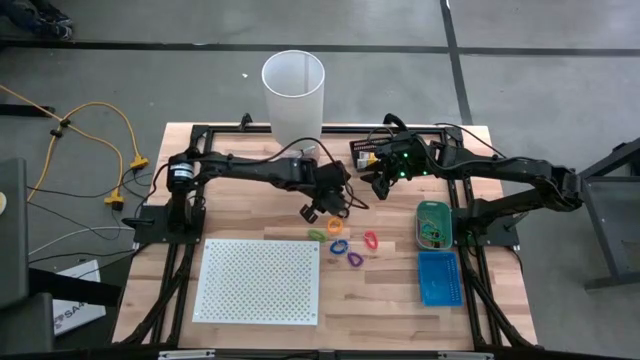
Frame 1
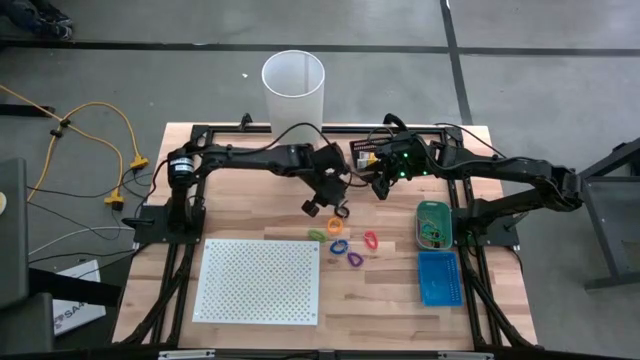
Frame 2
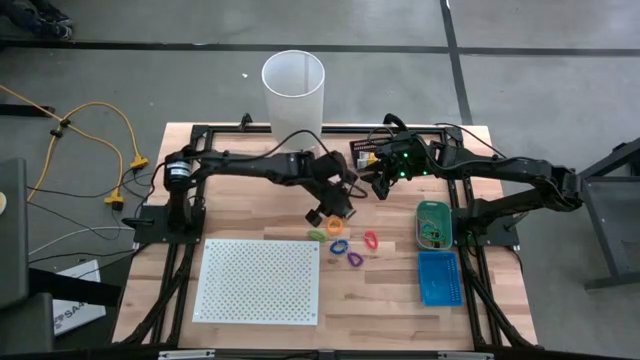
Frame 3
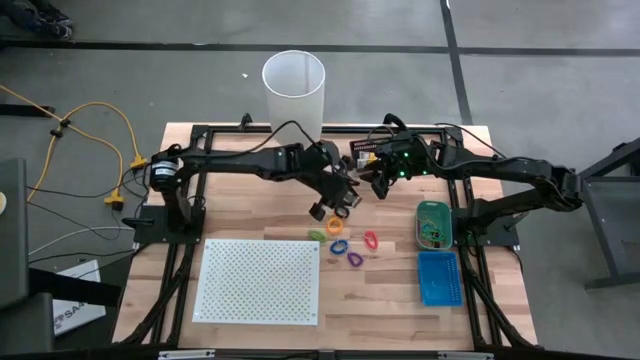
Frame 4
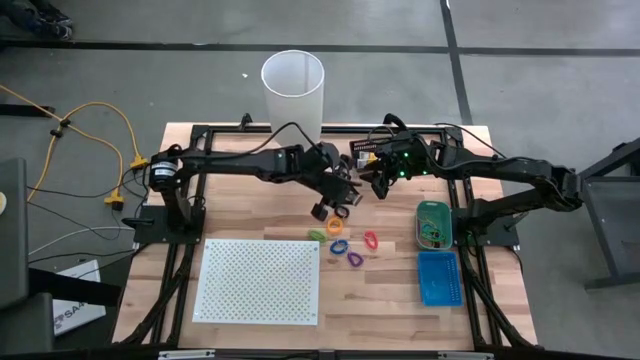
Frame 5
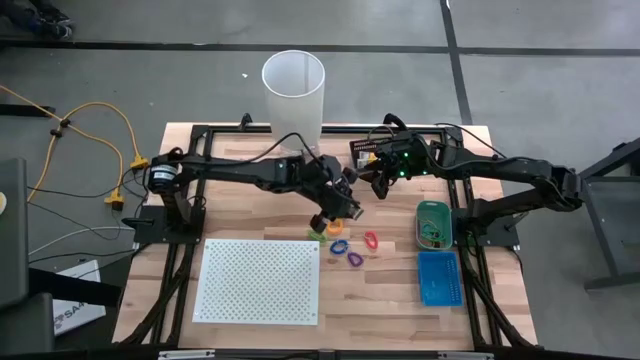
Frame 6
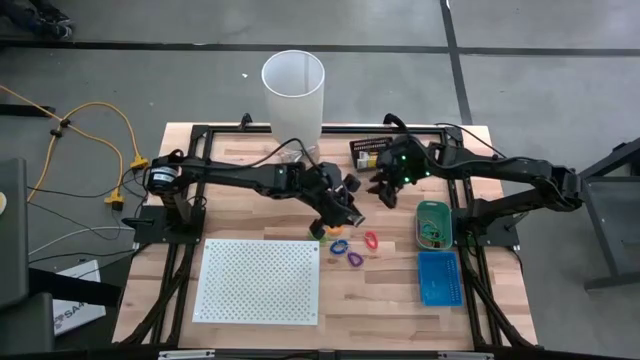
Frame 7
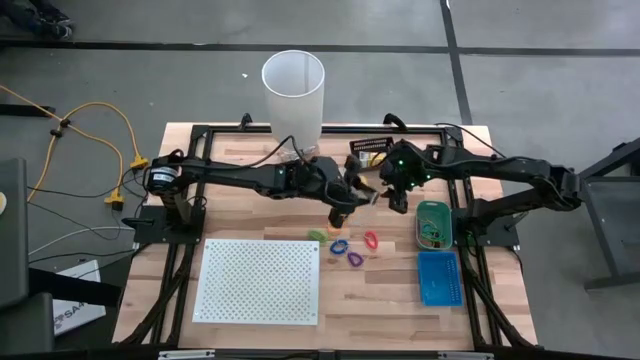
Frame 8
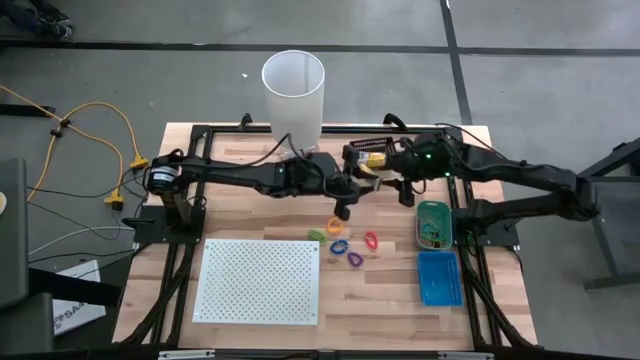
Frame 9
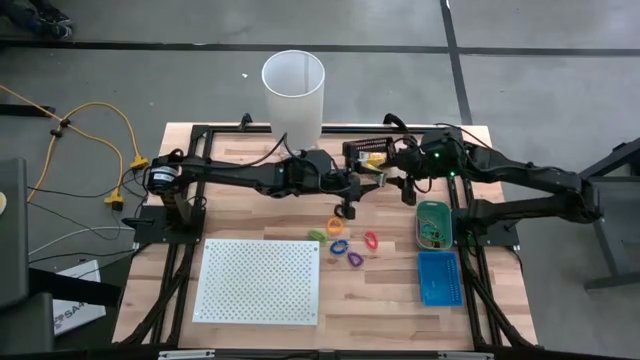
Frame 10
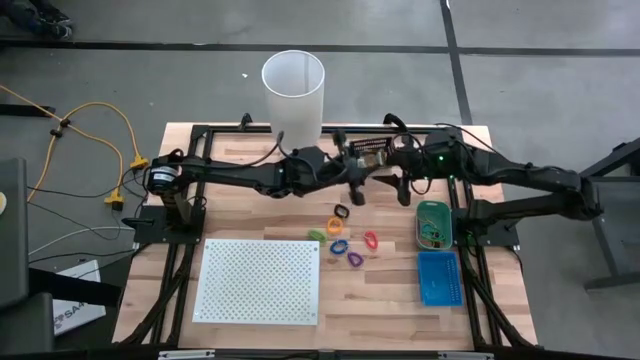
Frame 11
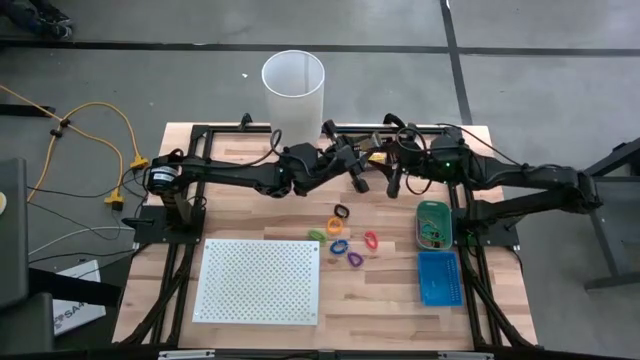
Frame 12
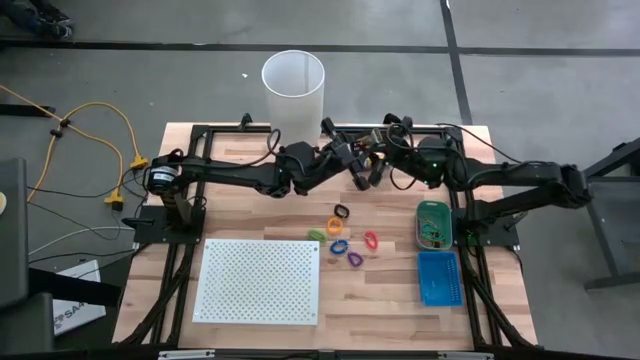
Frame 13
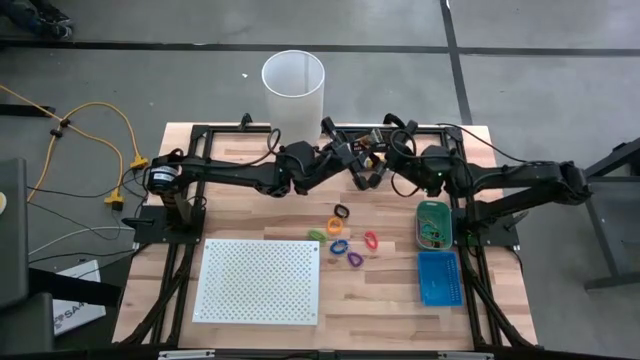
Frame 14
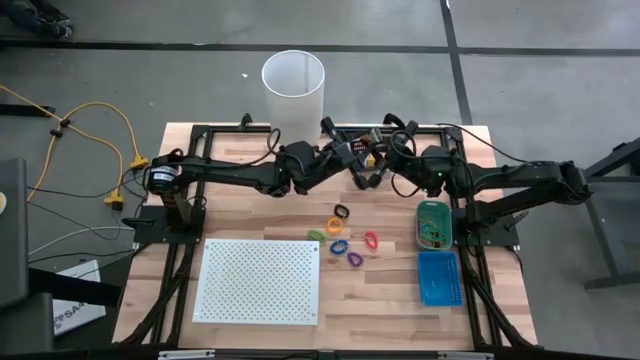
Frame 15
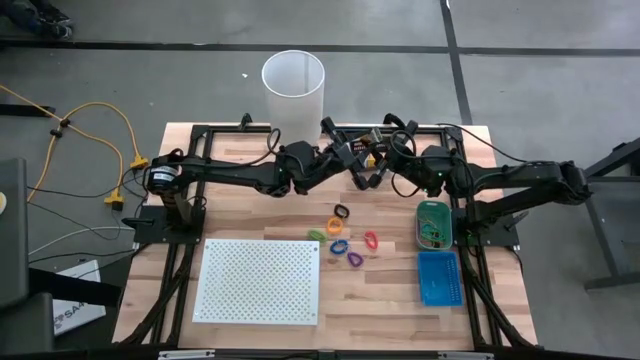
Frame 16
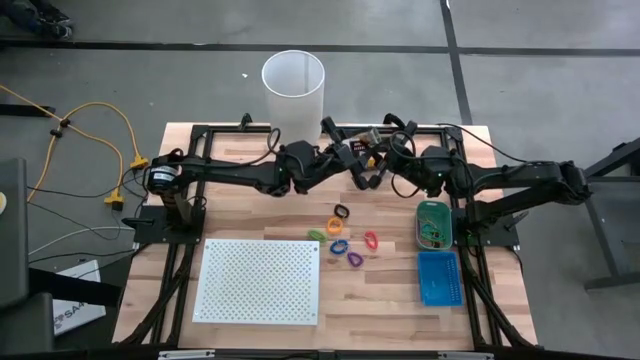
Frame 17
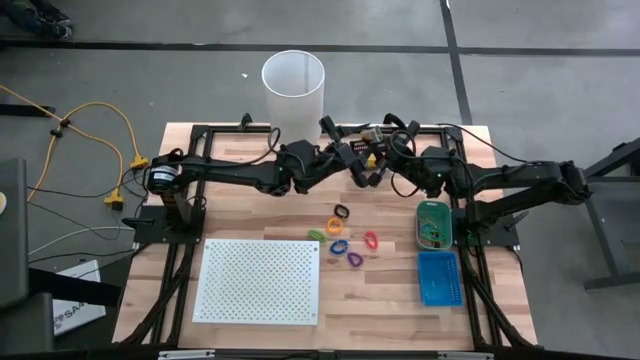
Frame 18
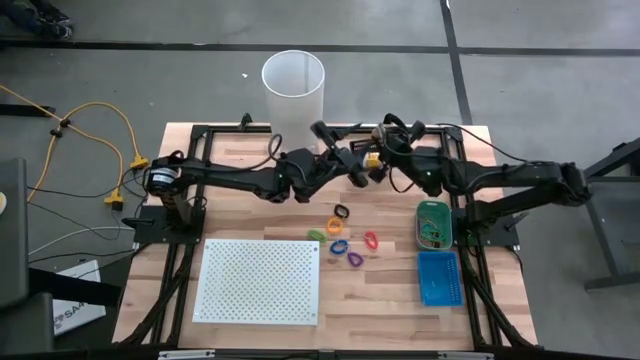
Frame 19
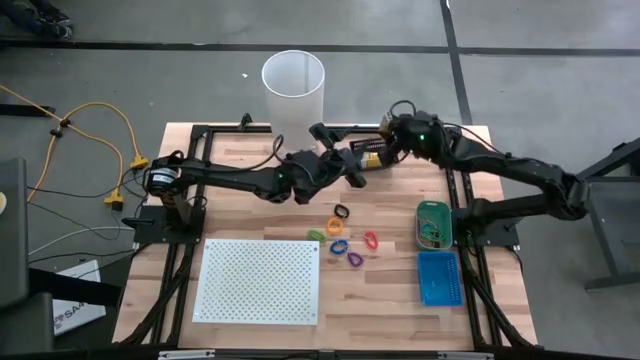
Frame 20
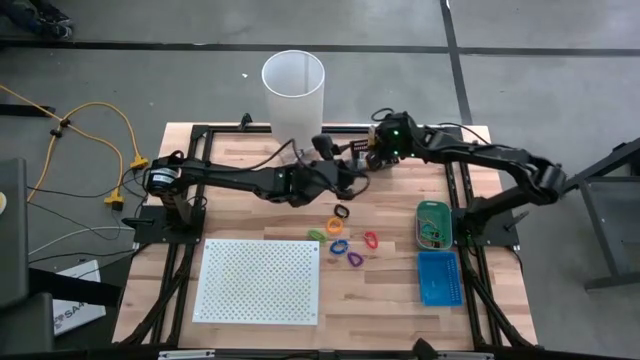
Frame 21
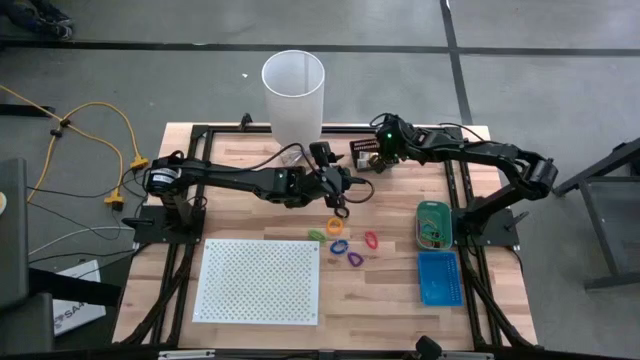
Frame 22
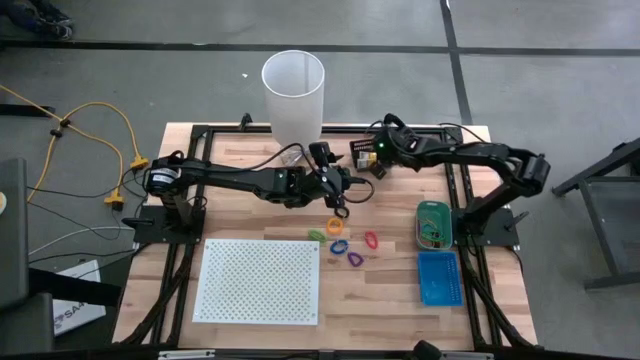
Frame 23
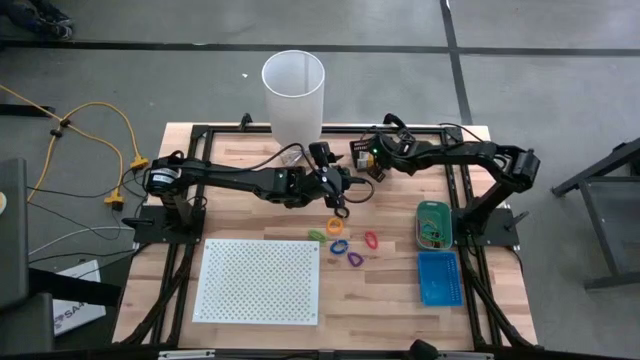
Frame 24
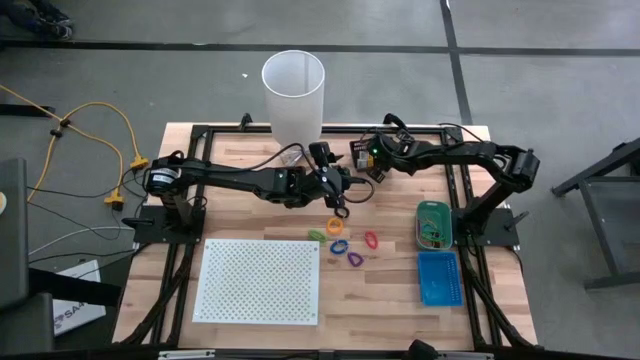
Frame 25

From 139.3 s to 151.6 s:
Task: Pick & Place Office Desk Supplies
Put the yellow crayon box into the black bin

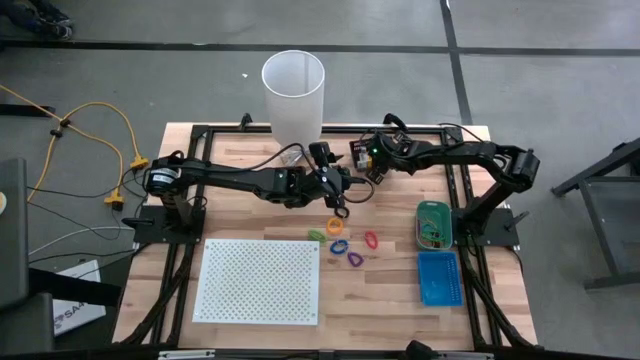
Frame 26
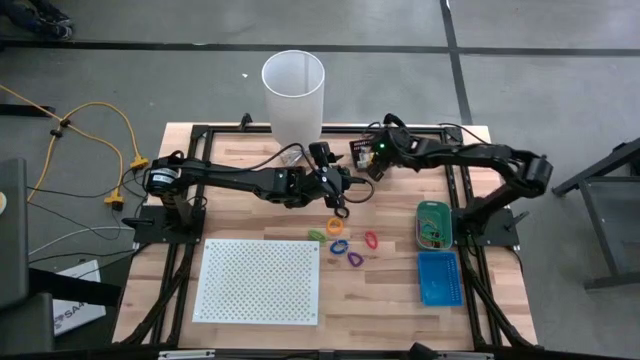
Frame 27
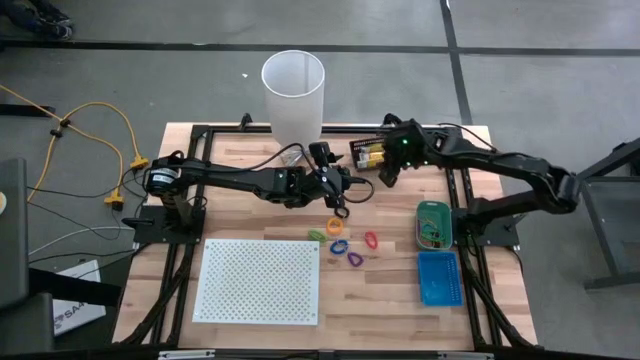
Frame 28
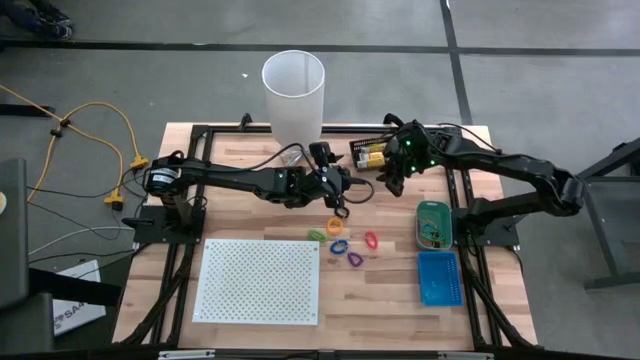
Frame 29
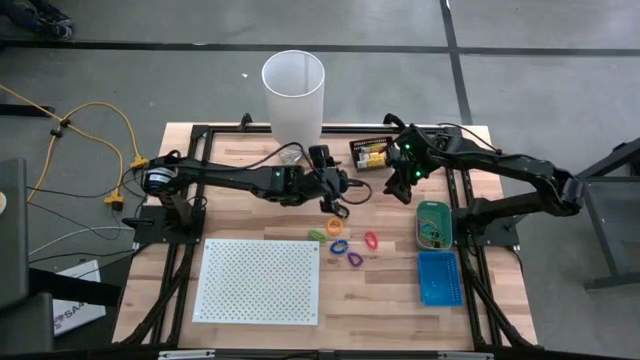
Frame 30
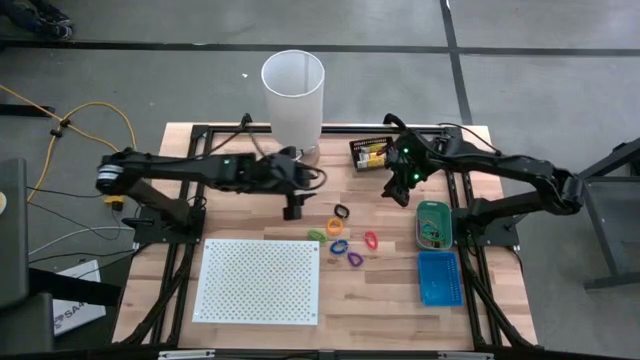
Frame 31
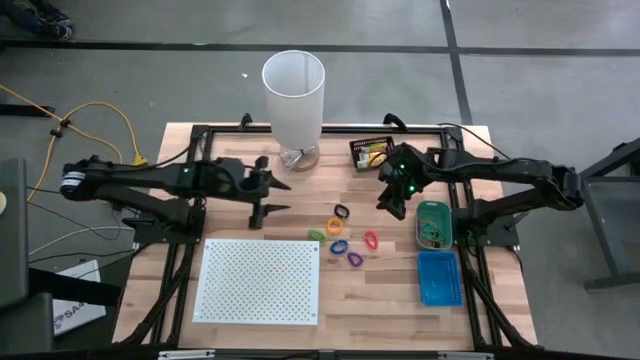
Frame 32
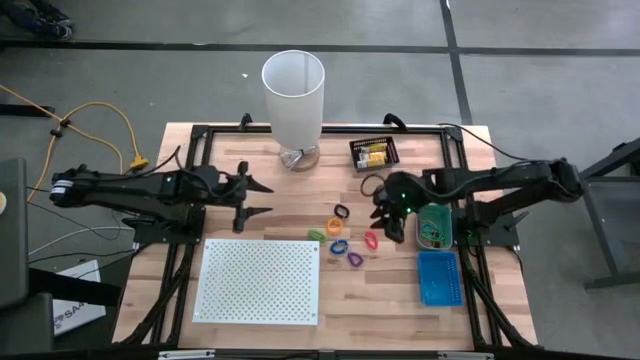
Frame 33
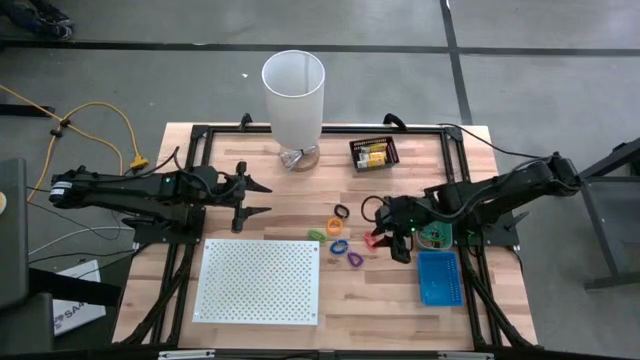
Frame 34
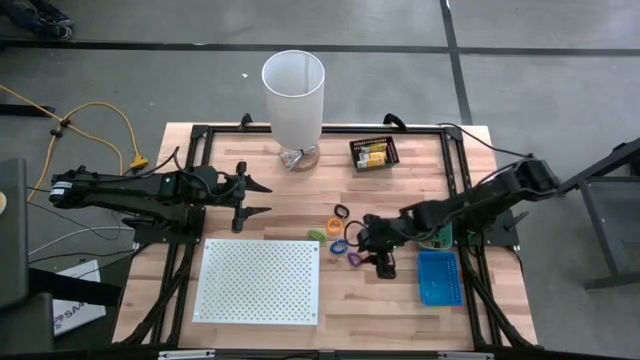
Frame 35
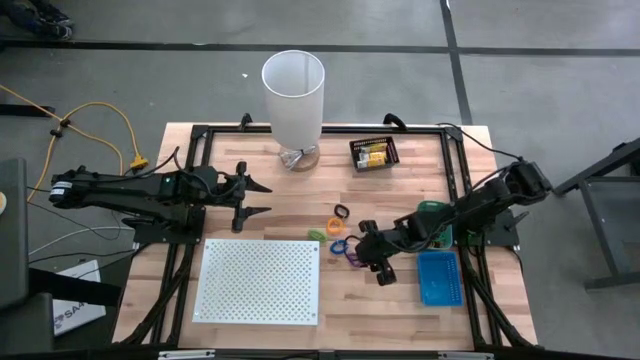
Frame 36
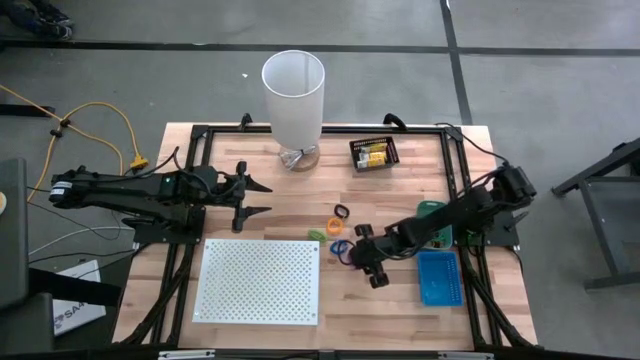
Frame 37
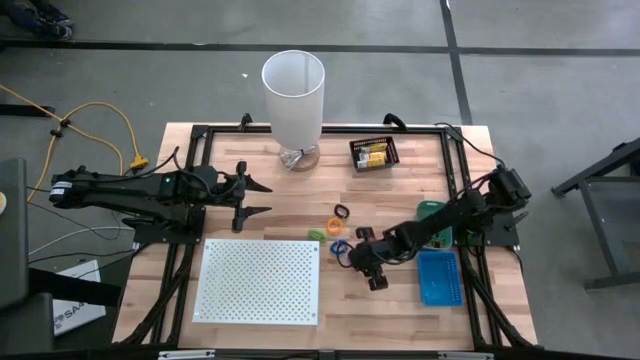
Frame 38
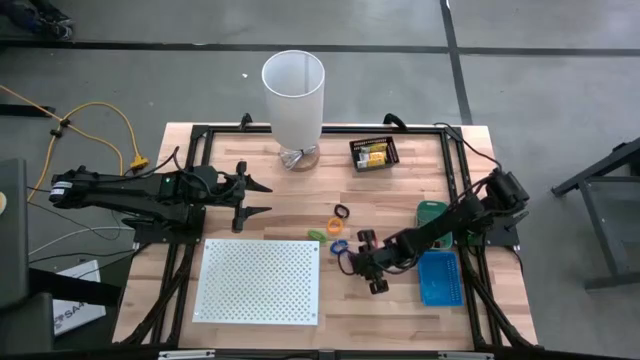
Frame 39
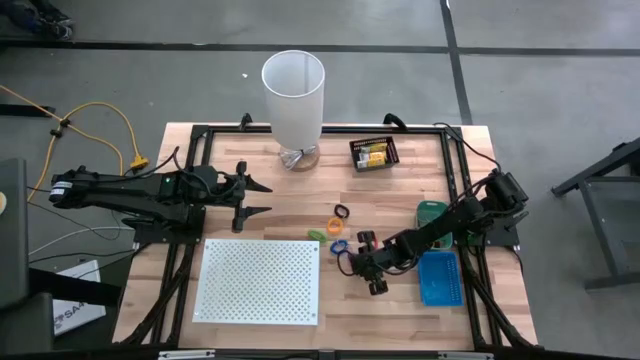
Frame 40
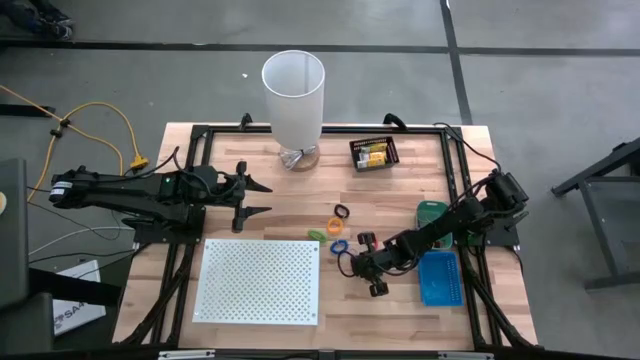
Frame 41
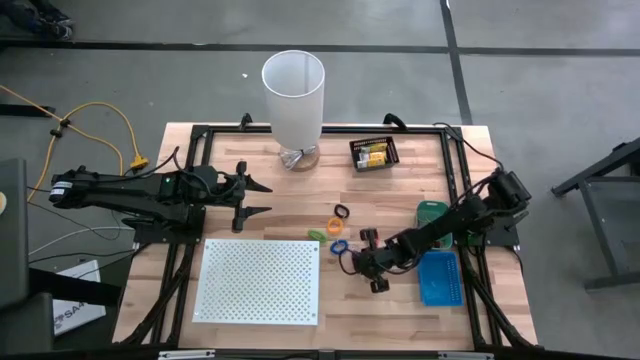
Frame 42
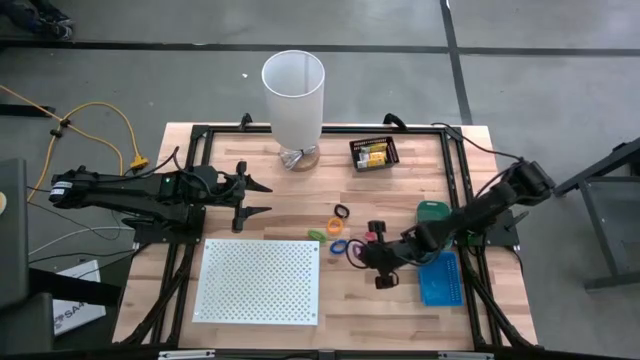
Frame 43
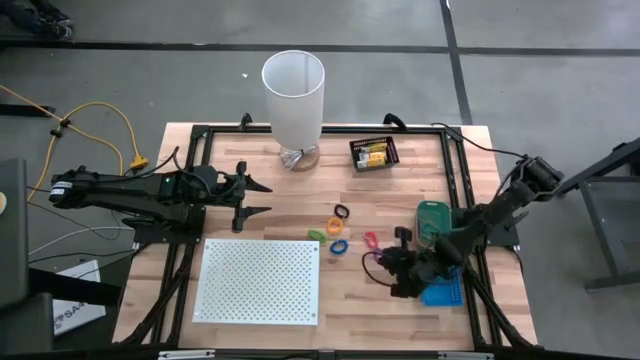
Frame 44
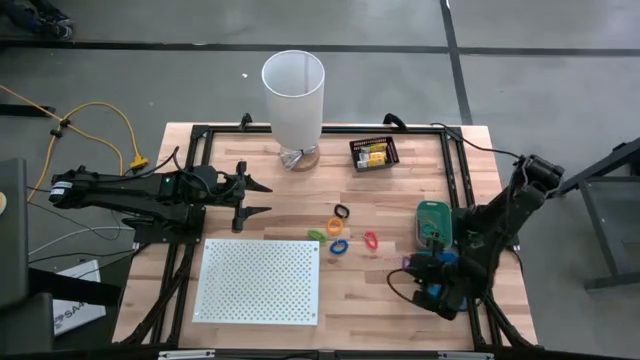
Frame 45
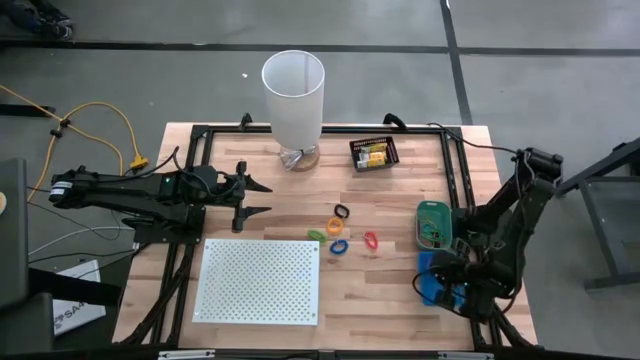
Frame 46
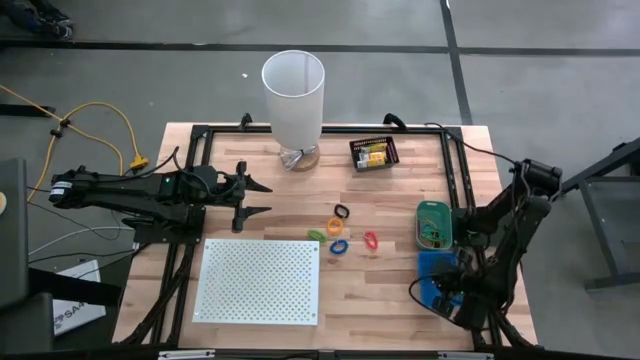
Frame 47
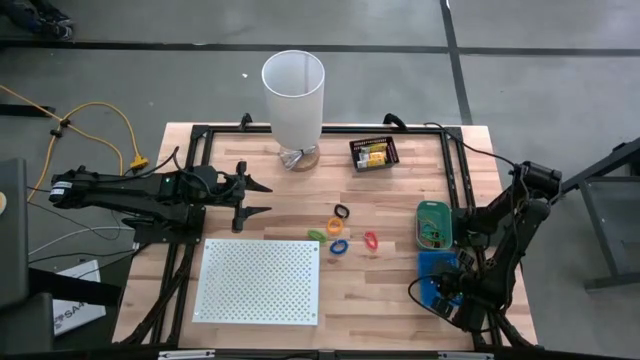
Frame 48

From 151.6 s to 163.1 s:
Put the violet spring keychain into the blue bin
